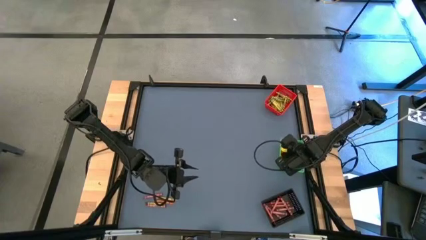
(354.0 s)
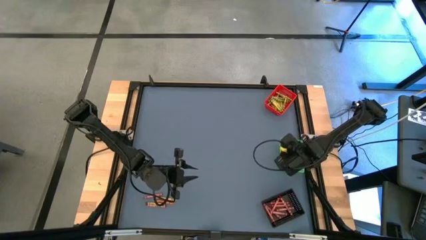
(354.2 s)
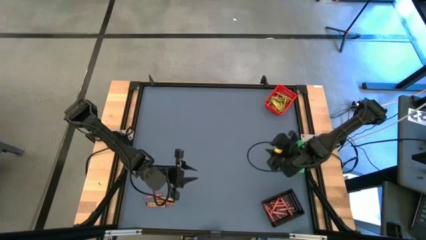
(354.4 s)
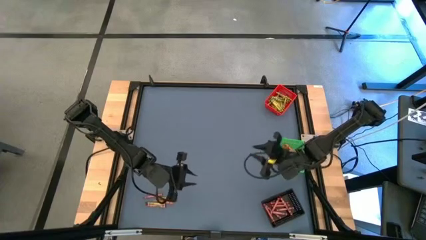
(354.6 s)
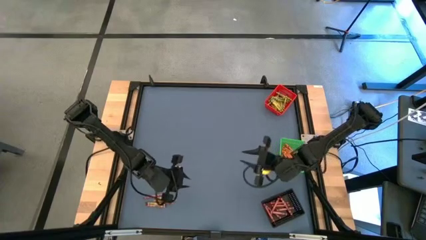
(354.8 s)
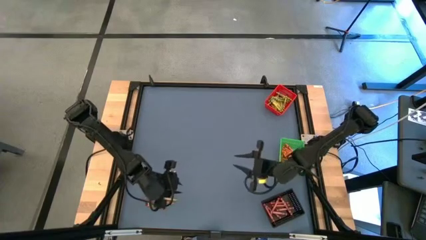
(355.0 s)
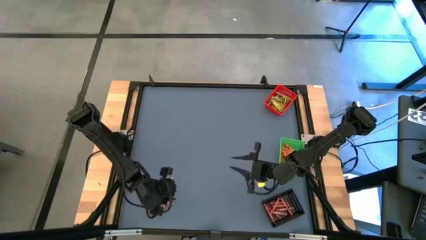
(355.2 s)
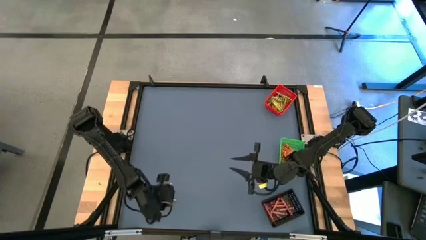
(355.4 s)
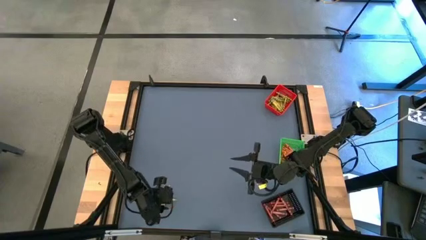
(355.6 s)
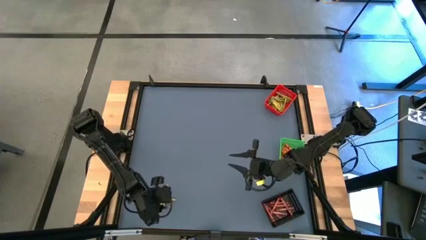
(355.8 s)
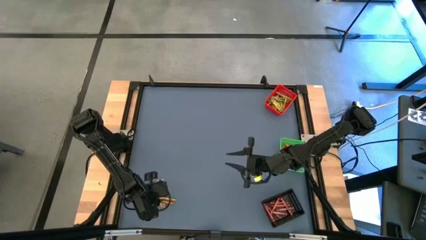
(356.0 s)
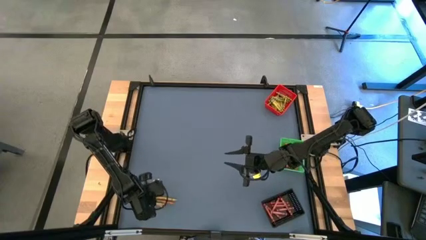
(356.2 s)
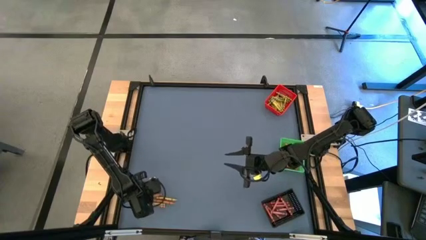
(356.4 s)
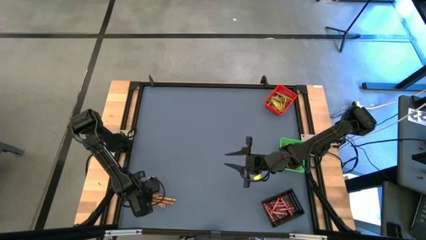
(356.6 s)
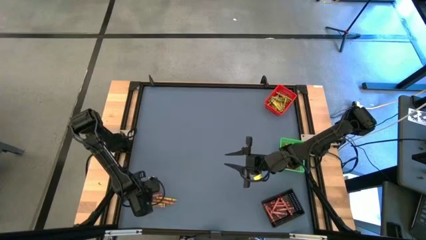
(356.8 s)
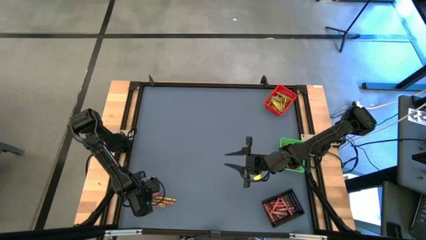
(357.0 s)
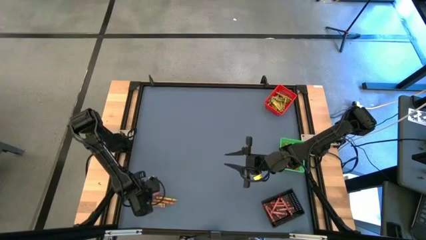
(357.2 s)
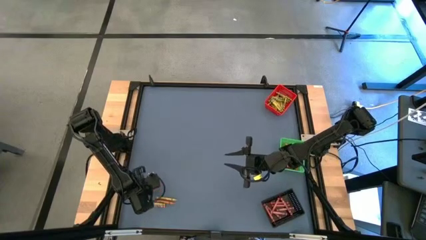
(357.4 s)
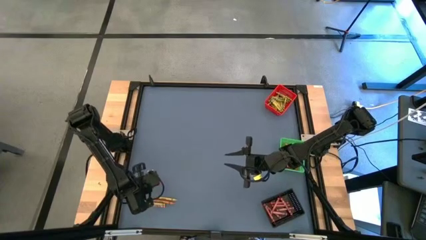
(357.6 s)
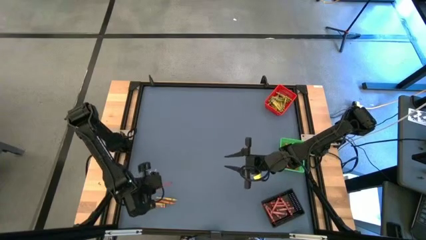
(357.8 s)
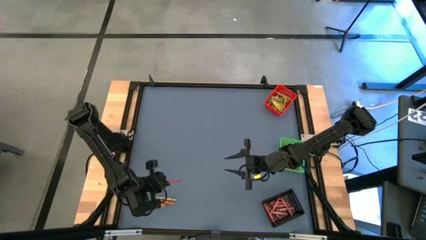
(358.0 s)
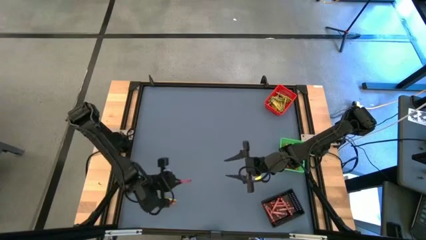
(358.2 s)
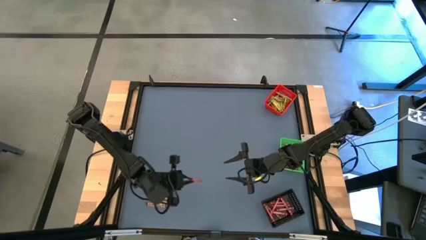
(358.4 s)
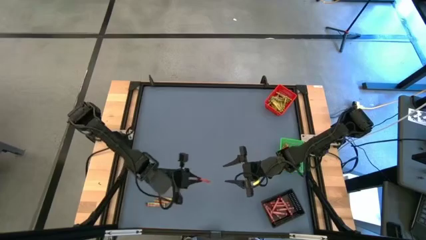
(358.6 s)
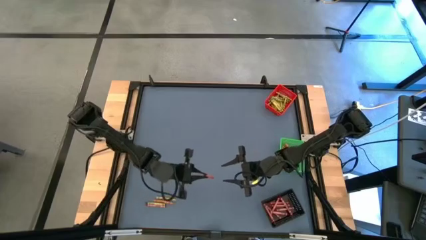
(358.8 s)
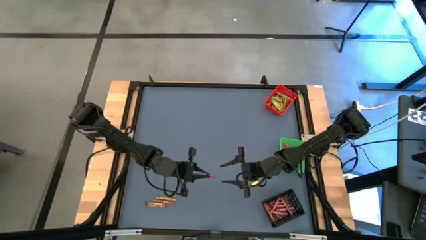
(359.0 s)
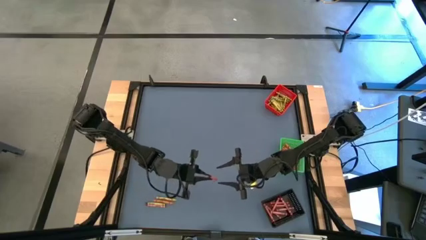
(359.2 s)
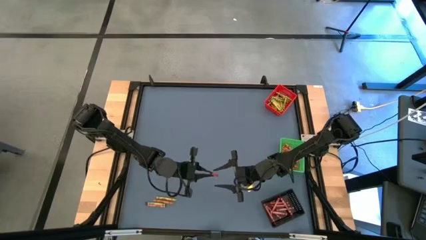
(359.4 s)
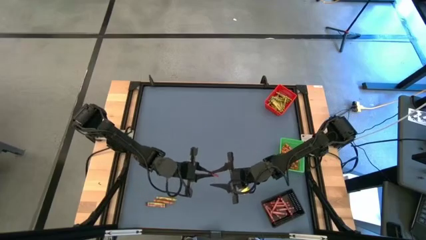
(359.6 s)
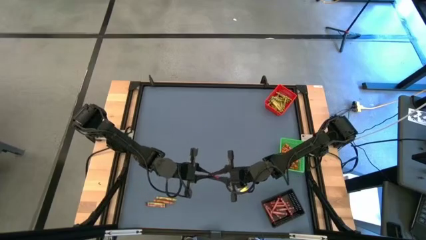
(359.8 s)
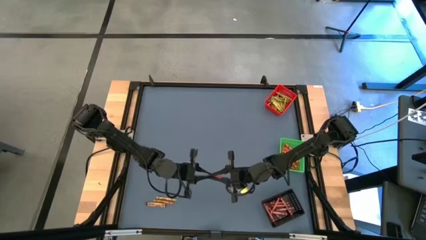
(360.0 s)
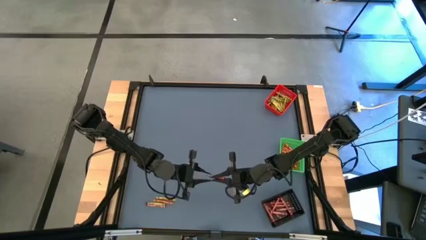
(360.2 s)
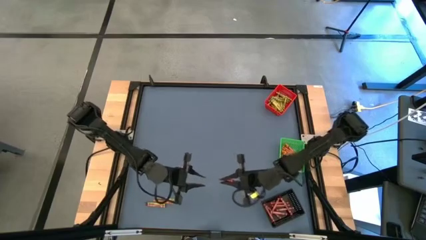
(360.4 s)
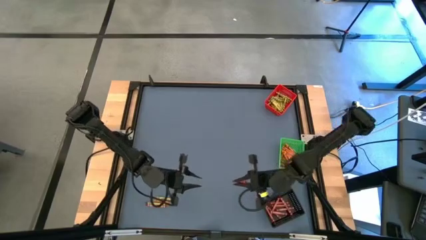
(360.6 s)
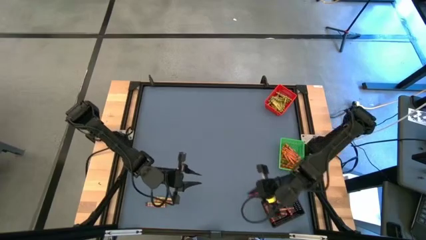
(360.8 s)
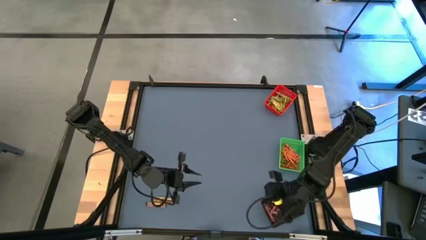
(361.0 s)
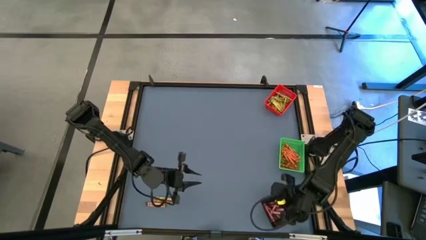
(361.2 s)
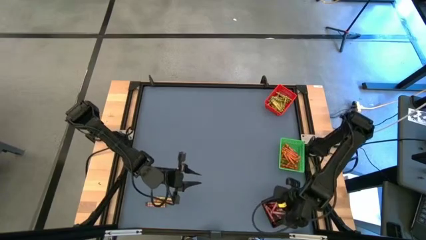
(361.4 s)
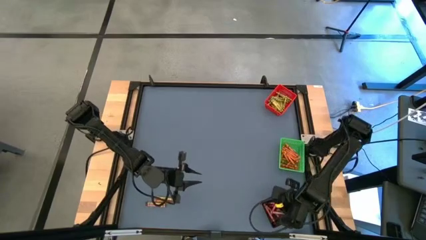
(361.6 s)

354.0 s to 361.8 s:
Task: Sort crayons
Put the red crayon into the black bin

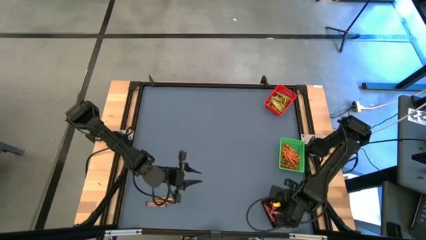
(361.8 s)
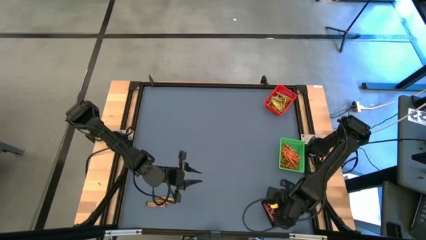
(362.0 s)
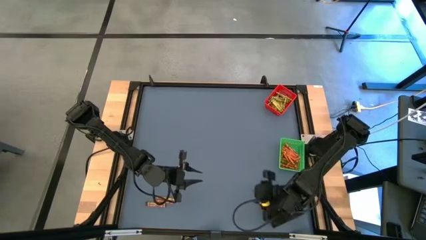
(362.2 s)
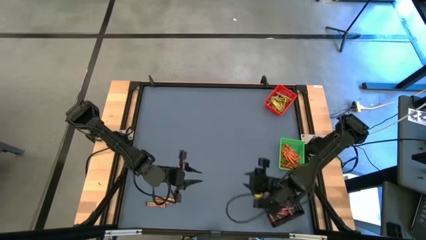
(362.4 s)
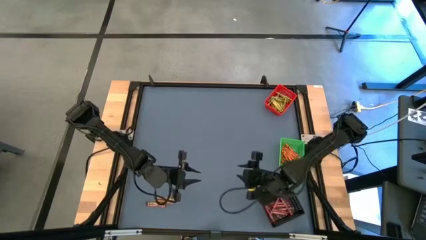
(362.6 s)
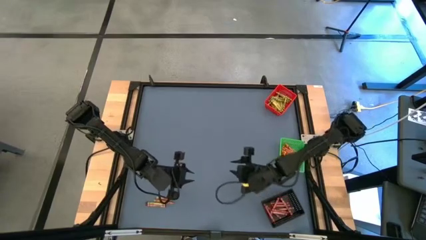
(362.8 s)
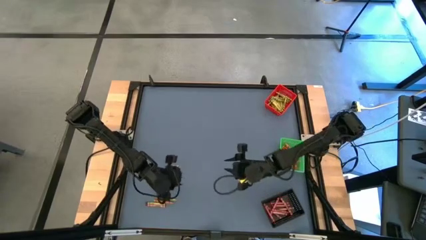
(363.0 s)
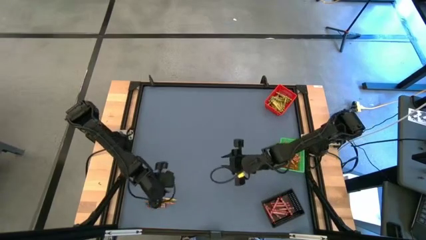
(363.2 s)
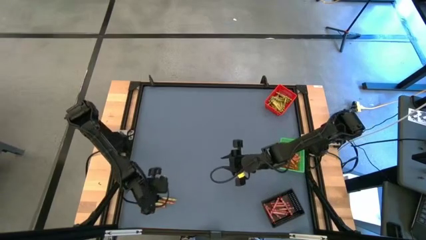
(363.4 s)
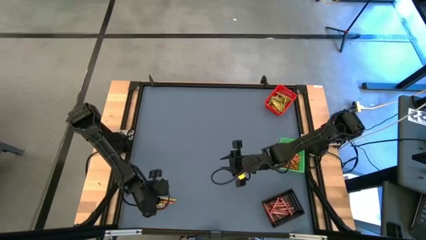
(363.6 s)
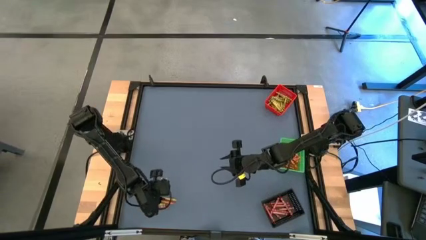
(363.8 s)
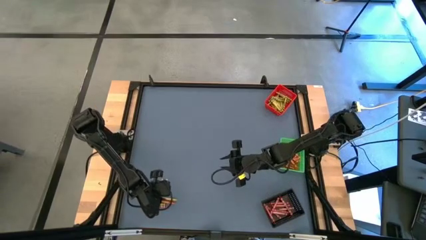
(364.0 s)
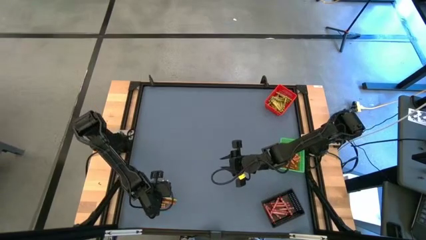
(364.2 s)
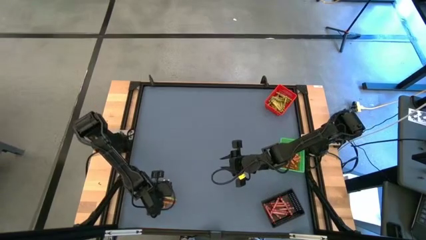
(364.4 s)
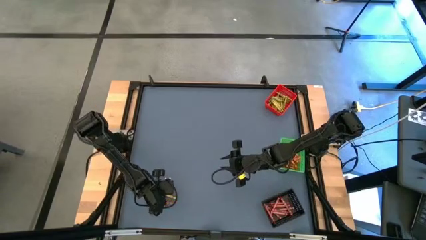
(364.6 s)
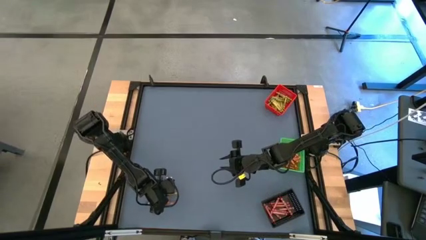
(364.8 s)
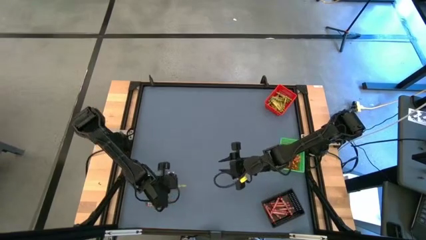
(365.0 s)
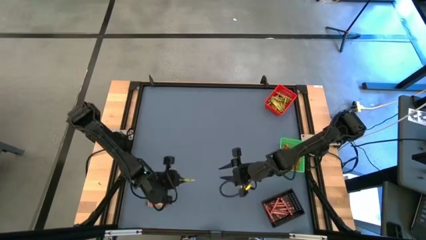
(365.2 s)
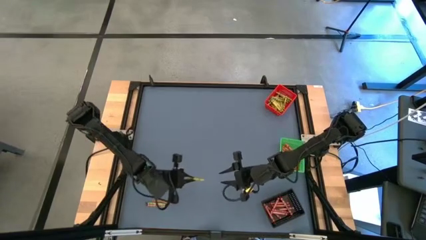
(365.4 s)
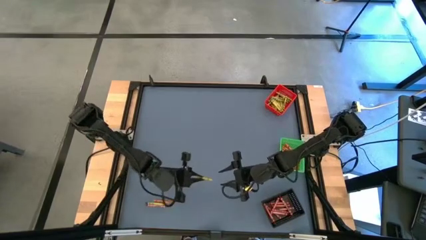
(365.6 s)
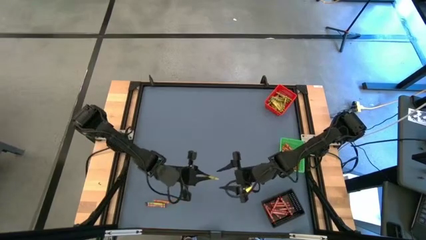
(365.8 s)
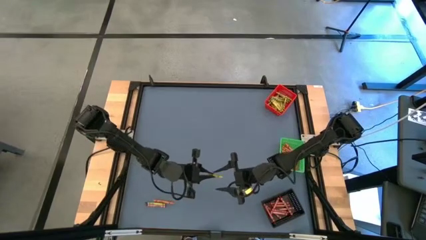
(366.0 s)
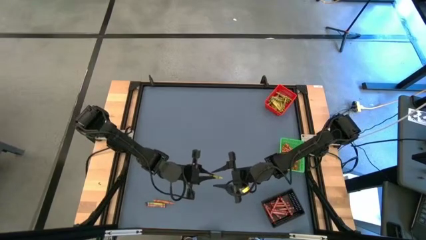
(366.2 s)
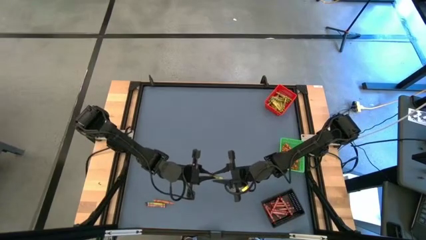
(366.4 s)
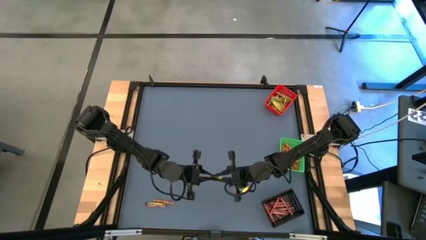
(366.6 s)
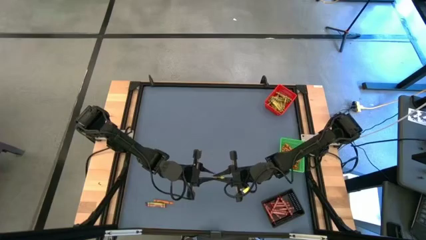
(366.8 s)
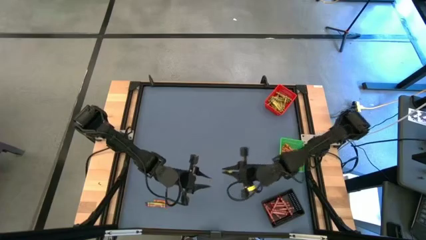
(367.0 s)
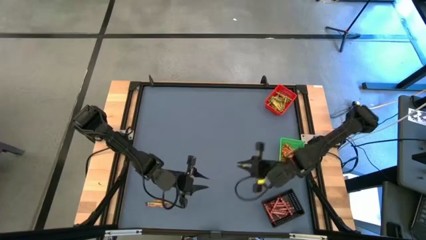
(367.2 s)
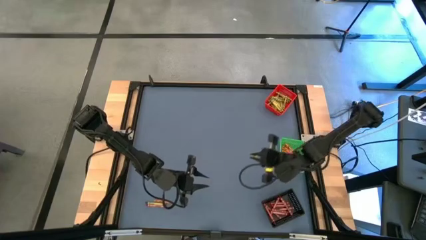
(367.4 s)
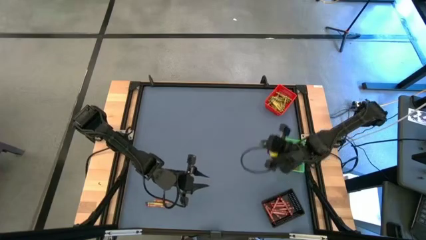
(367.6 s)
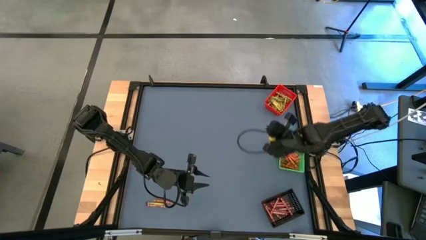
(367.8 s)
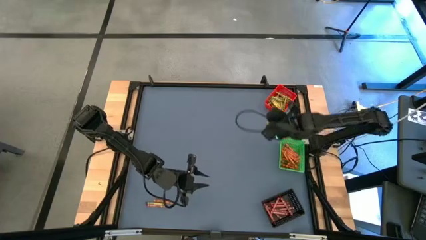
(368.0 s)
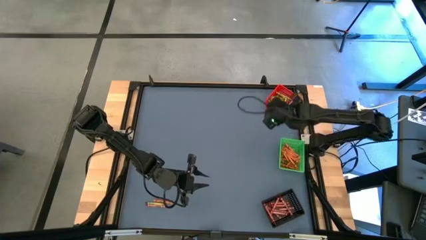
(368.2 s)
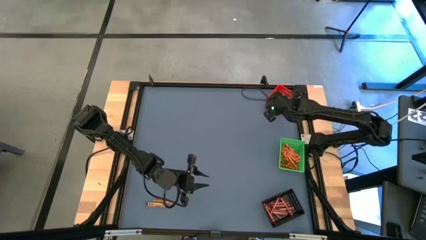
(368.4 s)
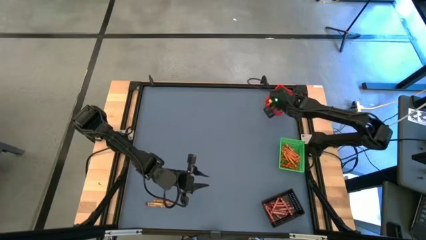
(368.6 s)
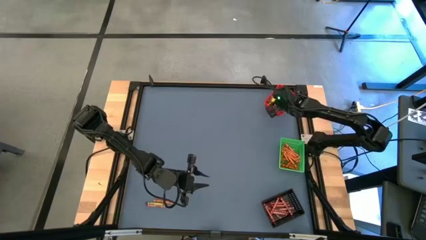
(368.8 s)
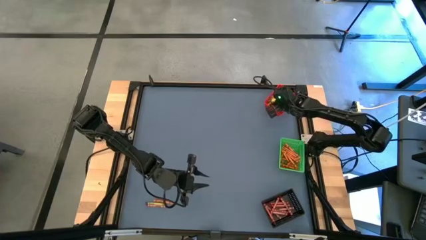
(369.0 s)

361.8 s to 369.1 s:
Put the light green crayon into the red bin
